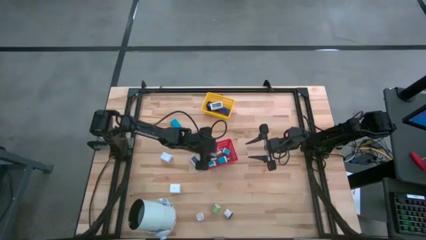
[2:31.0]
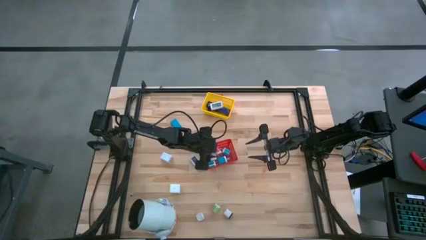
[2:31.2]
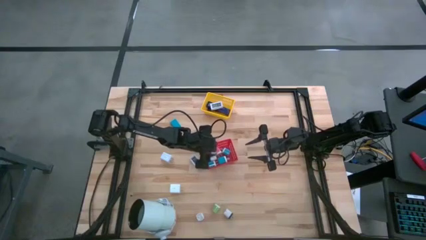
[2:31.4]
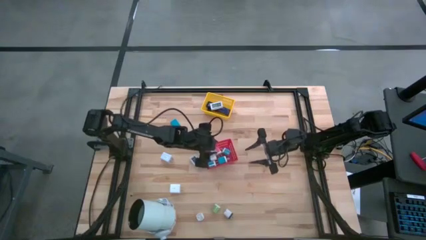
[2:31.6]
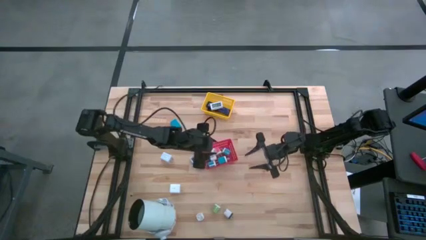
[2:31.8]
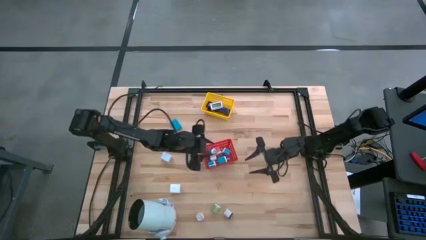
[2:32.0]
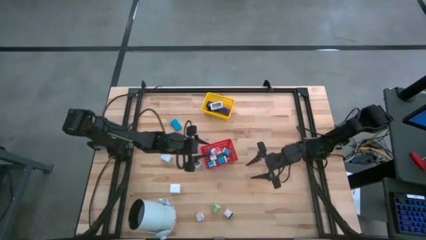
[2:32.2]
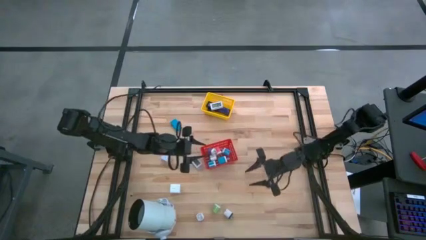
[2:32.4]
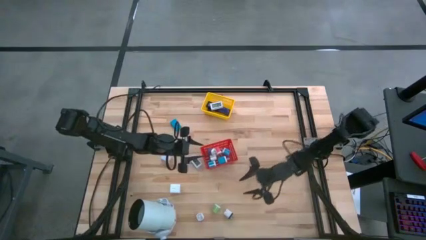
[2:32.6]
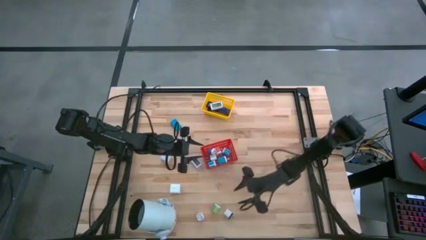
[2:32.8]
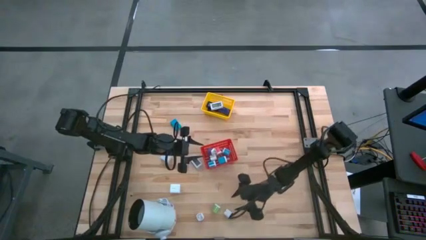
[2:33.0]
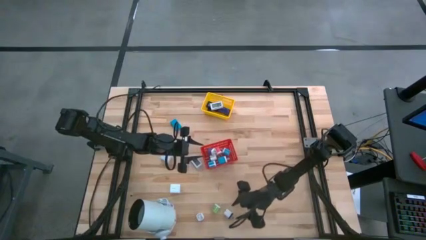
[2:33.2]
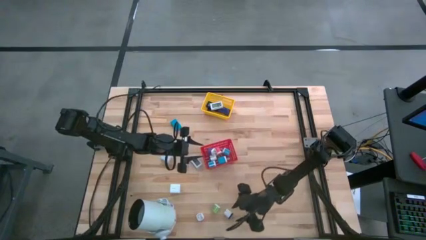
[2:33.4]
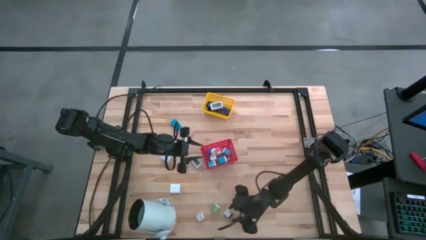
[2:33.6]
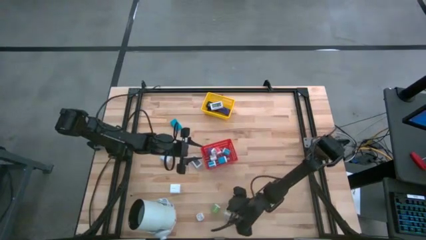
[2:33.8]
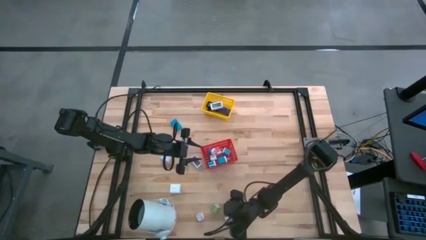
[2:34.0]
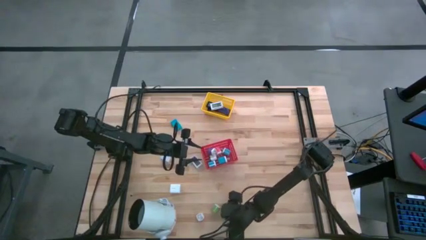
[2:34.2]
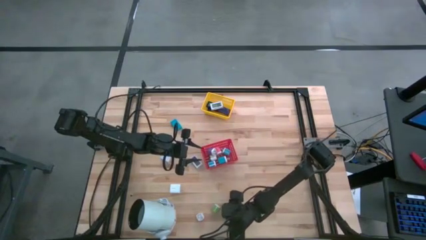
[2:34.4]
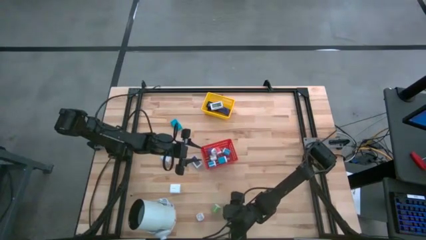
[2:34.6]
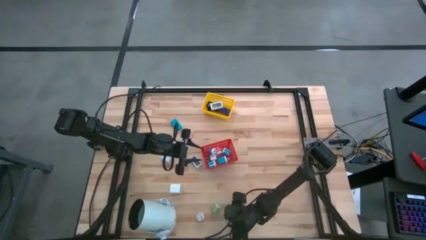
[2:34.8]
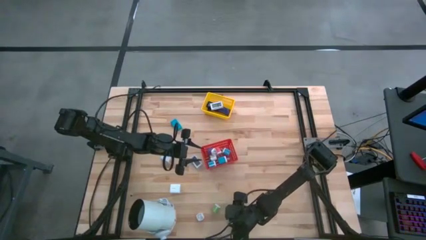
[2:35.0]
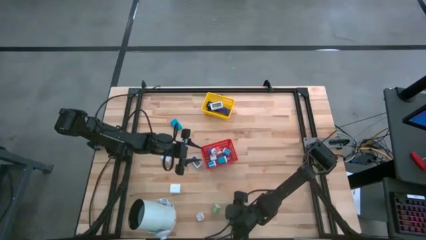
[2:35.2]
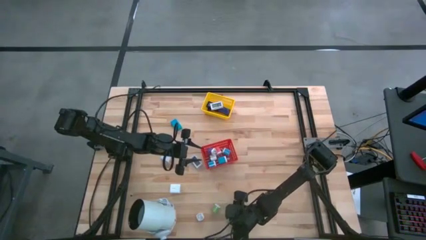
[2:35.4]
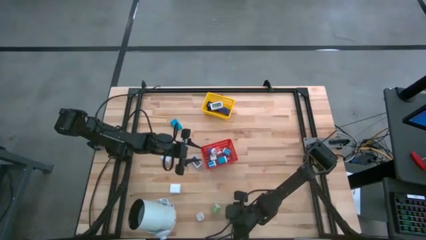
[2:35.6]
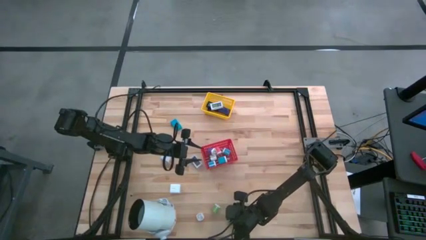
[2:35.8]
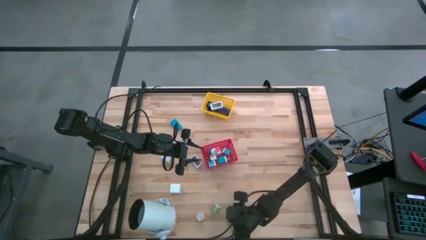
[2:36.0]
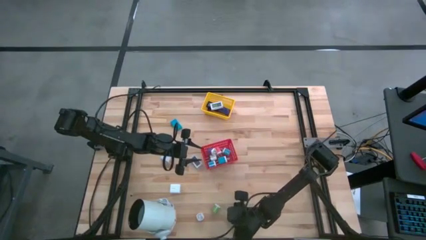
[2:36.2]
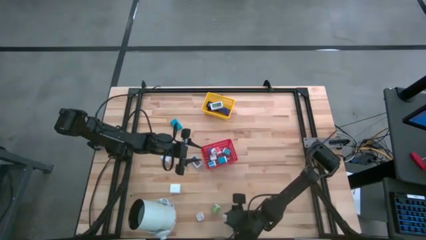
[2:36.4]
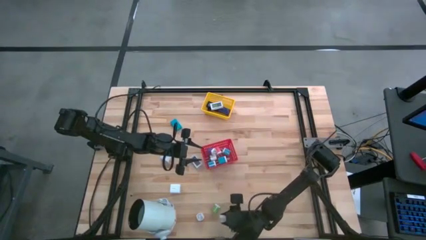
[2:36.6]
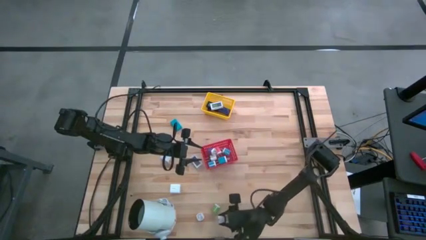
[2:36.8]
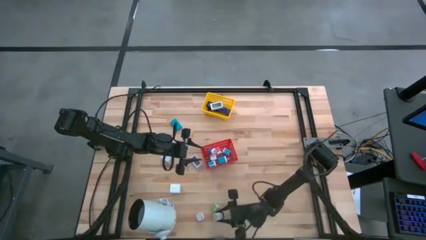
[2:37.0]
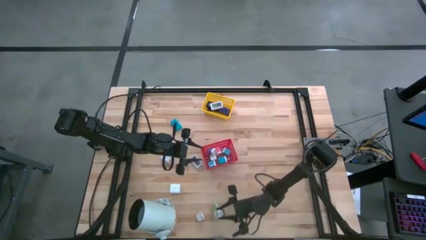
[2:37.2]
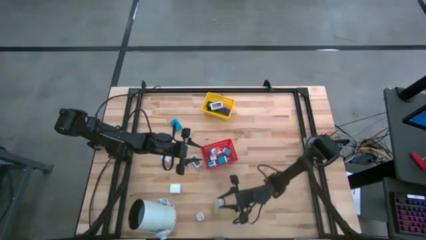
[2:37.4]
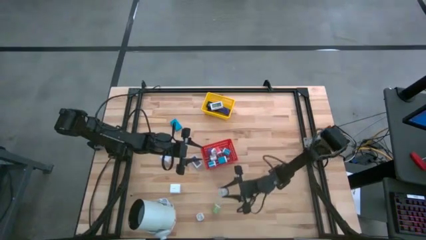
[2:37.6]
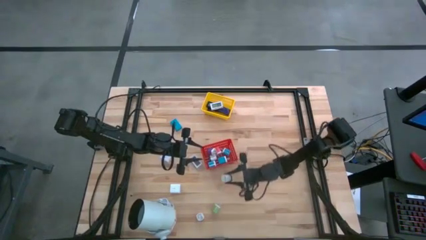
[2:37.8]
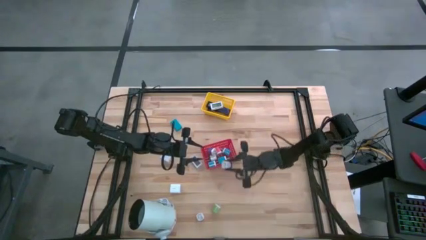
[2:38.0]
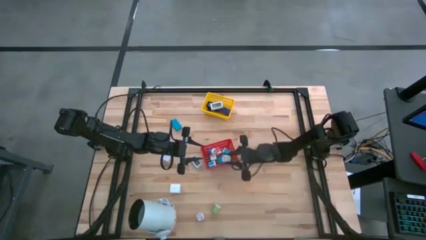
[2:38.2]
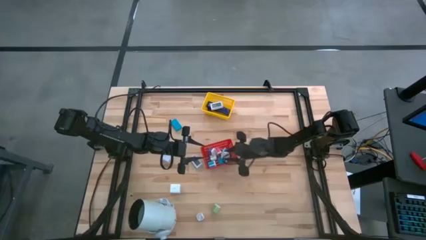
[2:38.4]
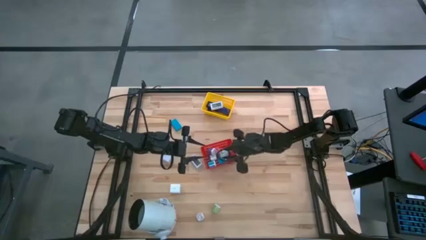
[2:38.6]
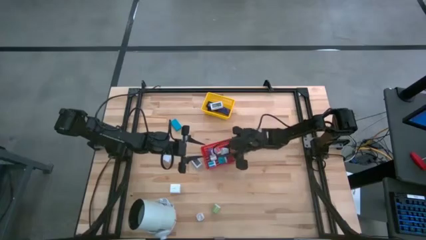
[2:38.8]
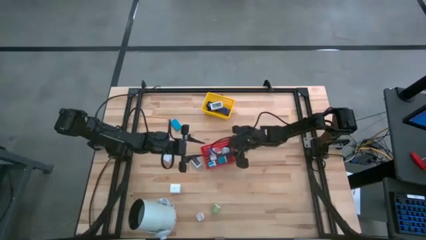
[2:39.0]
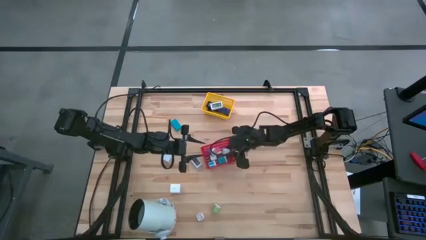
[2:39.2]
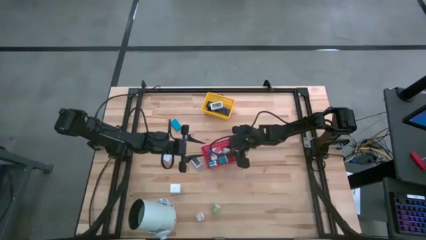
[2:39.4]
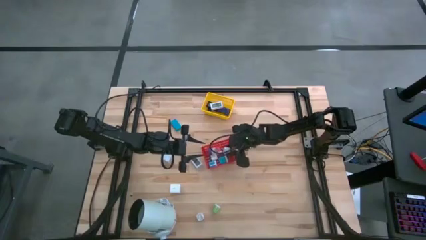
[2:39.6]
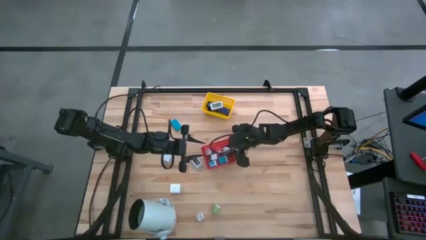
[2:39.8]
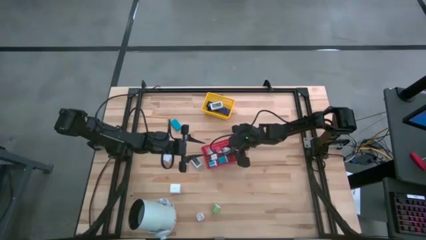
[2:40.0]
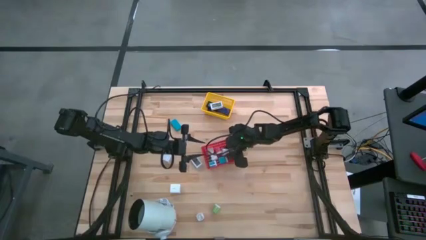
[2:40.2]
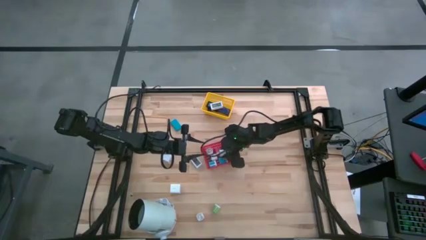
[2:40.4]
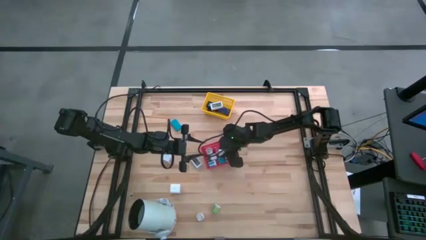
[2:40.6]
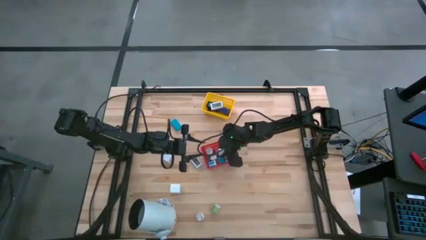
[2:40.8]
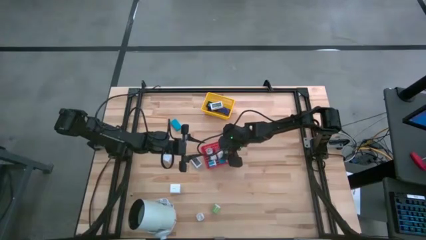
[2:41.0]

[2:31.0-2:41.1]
Task: Pick & Place Office items
Put the white and black charger adapter into the red bin

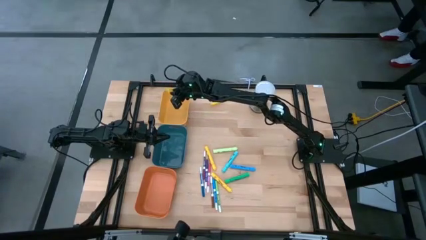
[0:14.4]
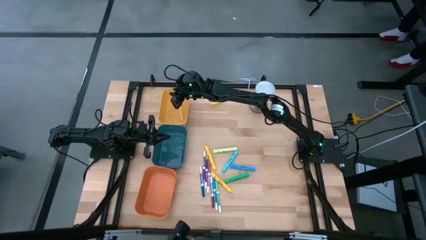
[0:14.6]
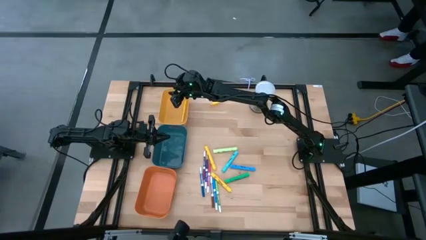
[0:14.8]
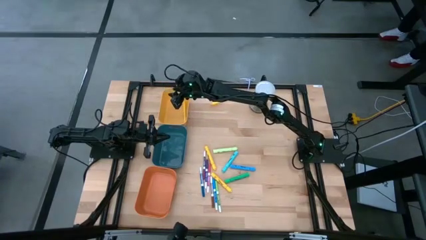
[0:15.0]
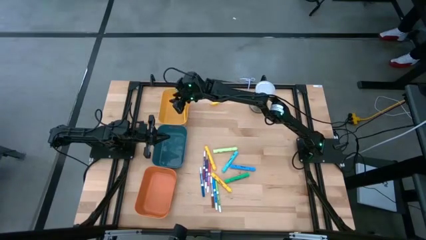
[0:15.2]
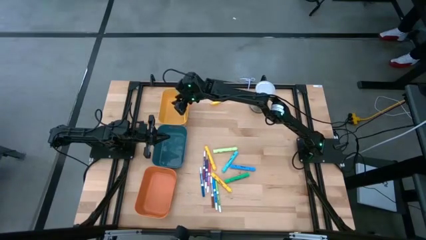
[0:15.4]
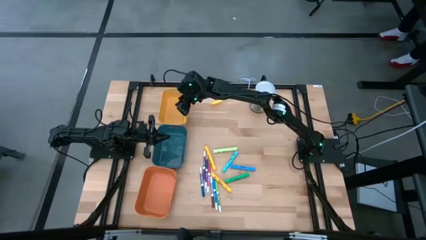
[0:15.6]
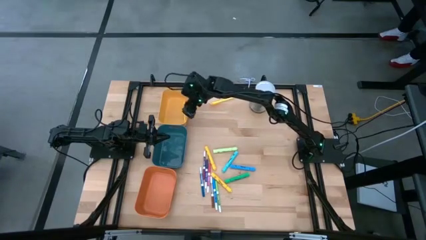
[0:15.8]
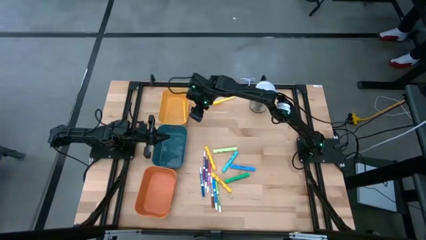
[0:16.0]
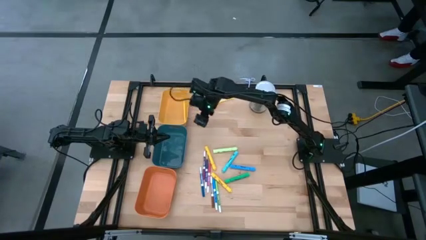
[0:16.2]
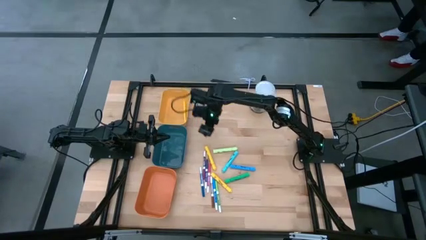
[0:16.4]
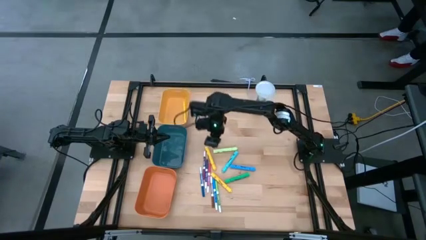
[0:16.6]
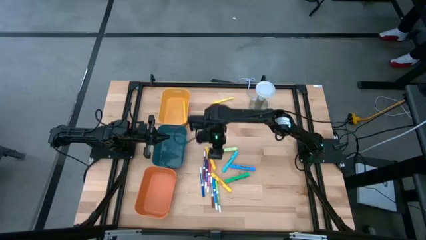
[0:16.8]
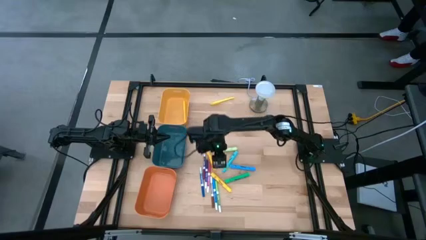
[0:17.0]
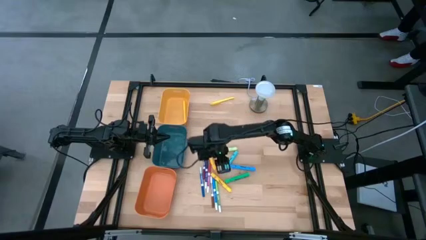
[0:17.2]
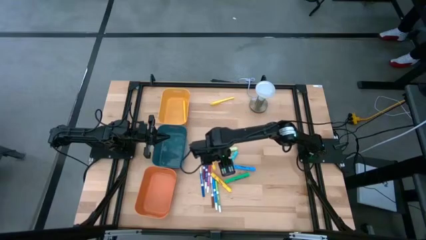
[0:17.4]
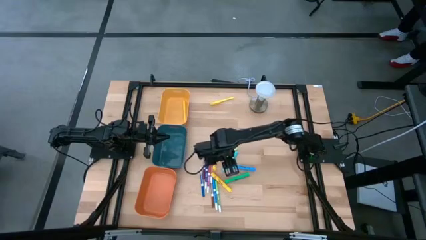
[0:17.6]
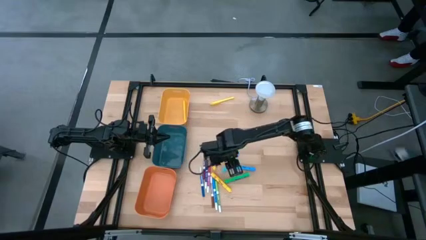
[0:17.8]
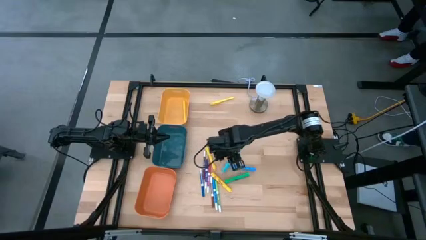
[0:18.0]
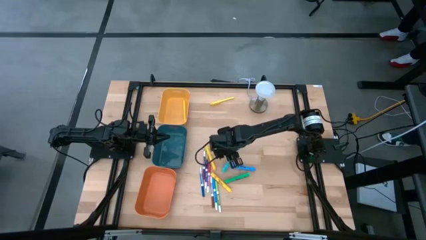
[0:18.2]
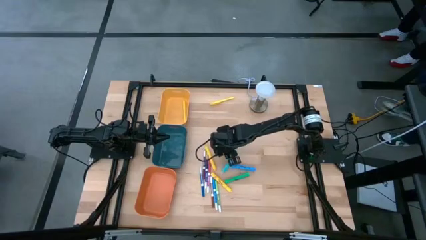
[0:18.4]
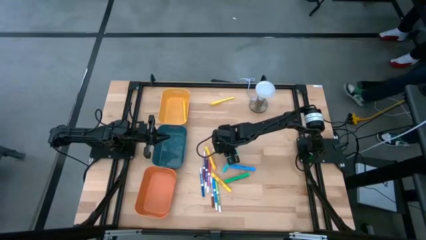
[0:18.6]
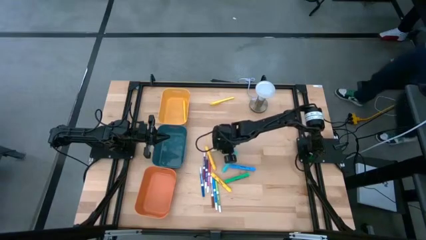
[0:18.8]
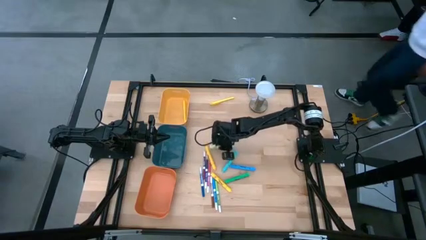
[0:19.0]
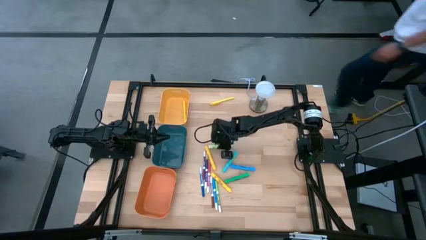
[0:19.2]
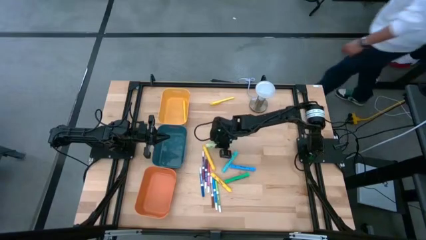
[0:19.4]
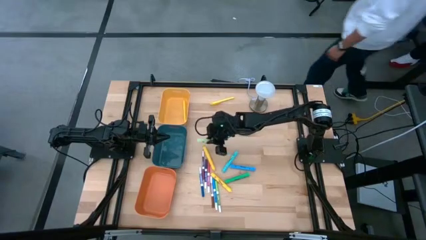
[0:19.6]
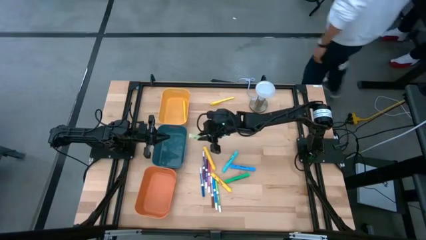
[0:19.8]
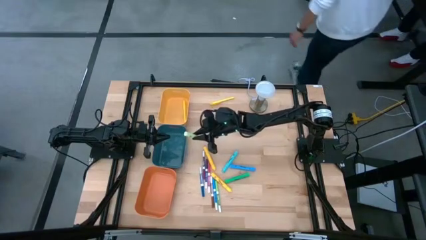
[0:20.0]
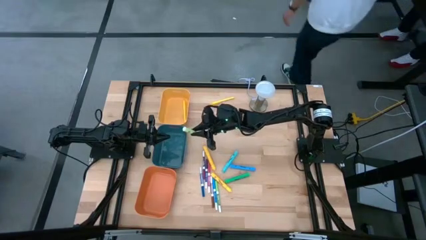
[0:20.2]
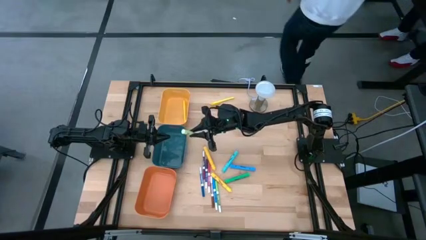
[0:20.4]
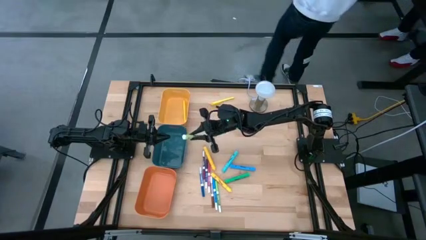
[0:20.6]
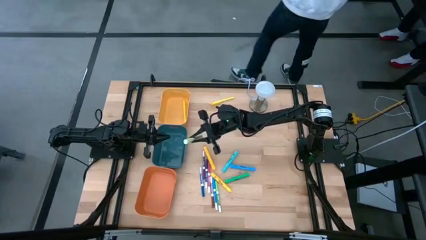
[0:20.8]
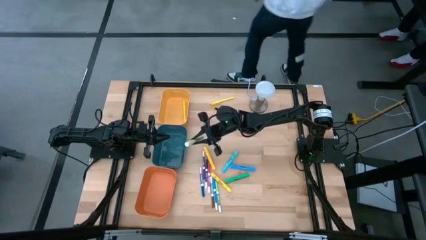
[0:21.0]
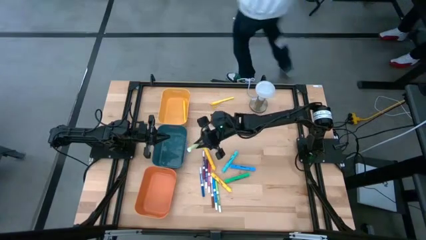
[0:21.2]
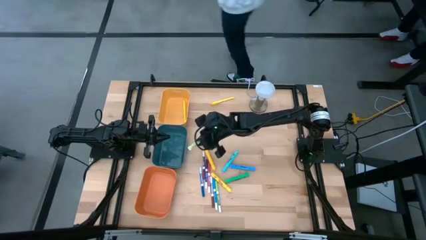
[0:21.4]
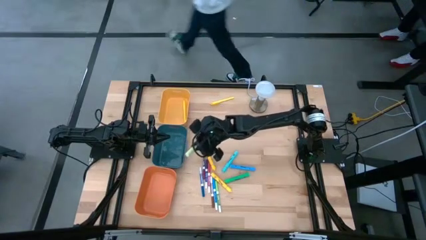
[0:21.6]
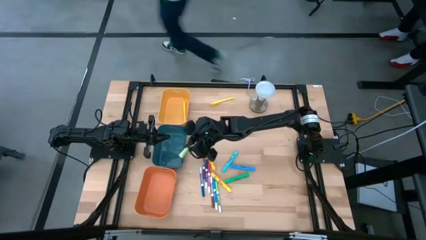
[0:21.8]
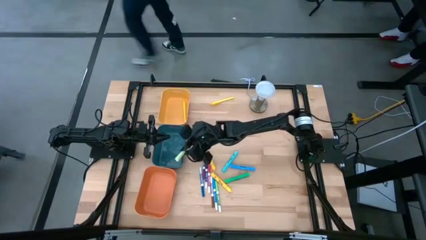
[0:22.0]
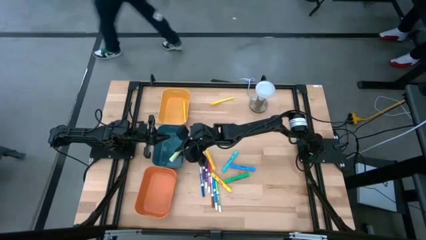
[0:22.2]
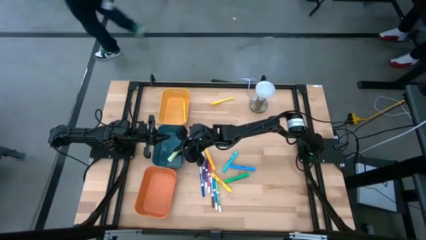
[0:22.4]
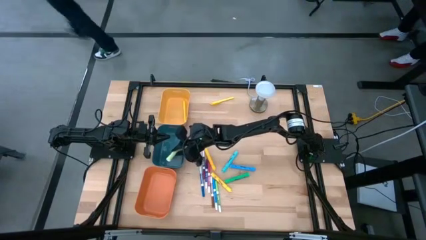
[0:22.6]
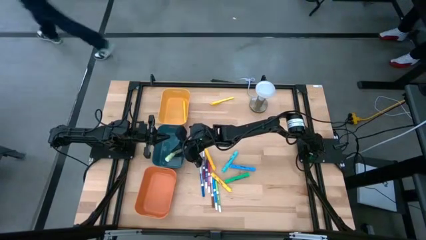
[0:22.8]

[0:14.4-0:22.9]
Task: Pick & Place Markers
Put the light green highlighter pen into the blue bin
